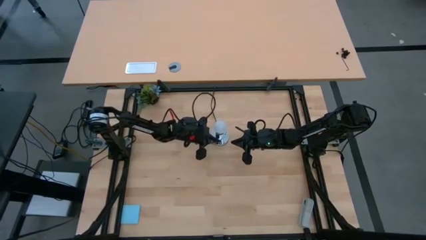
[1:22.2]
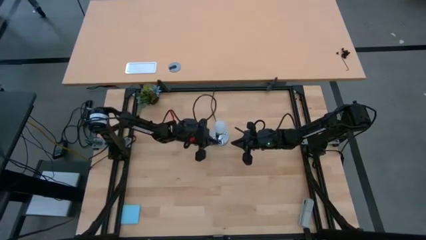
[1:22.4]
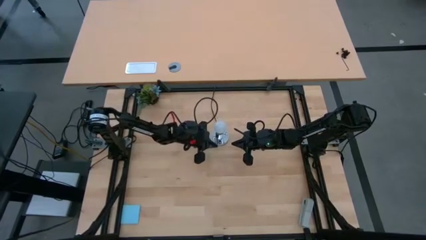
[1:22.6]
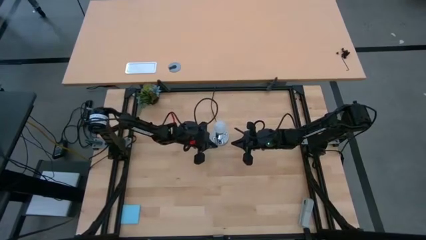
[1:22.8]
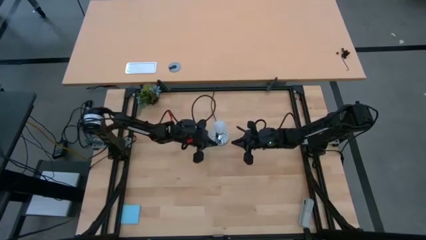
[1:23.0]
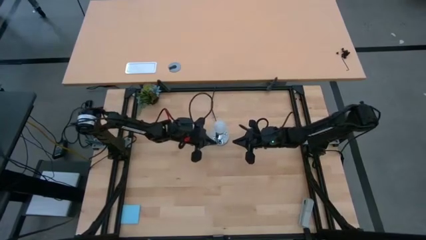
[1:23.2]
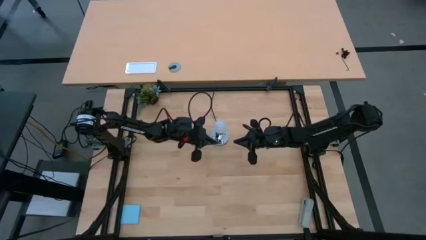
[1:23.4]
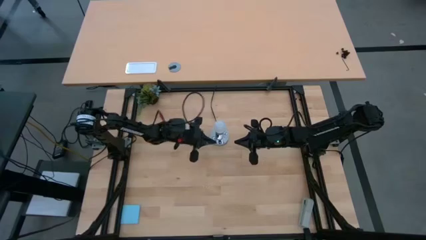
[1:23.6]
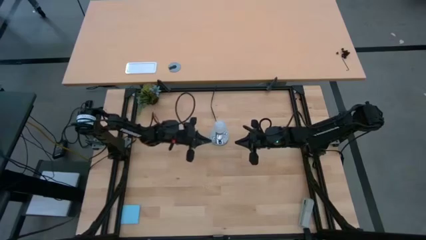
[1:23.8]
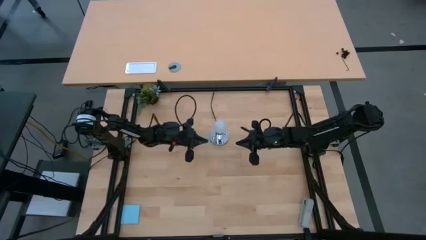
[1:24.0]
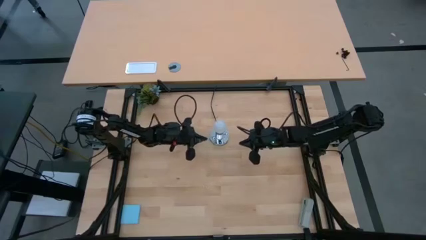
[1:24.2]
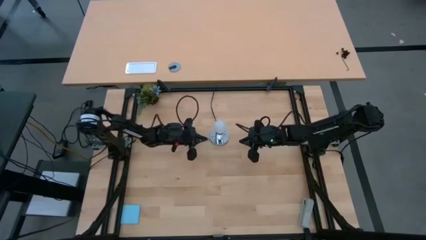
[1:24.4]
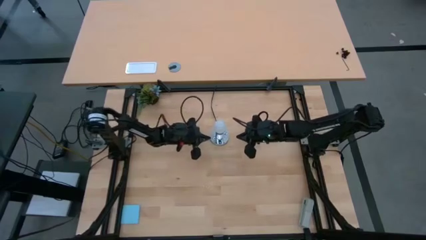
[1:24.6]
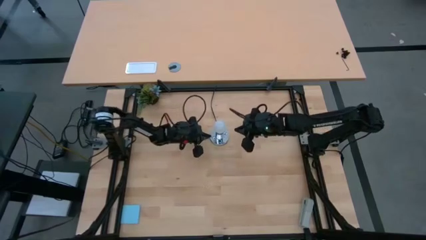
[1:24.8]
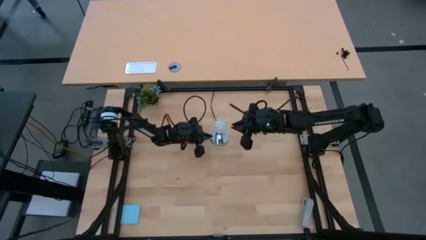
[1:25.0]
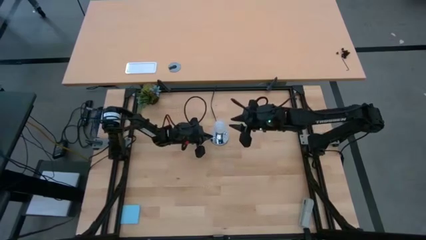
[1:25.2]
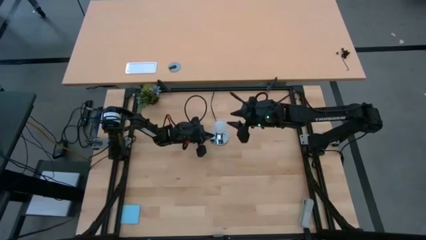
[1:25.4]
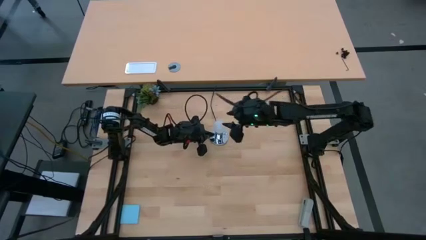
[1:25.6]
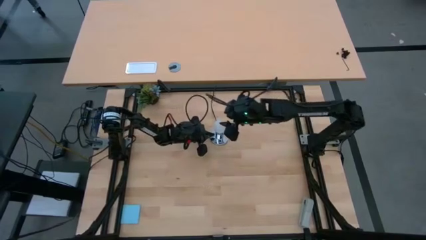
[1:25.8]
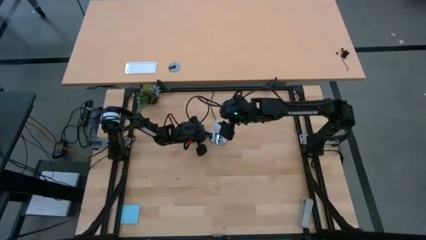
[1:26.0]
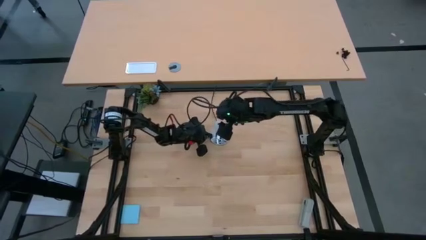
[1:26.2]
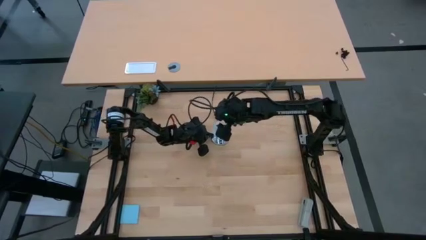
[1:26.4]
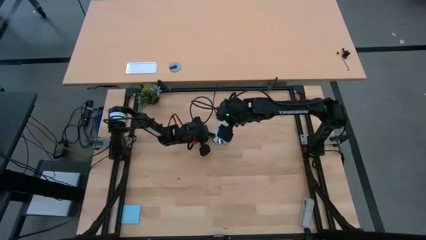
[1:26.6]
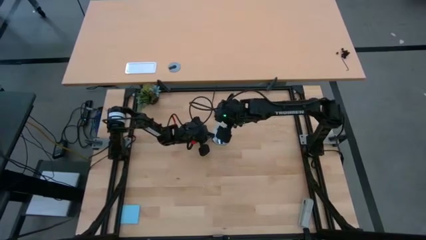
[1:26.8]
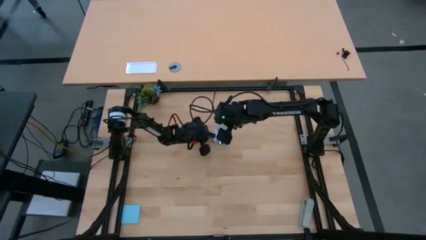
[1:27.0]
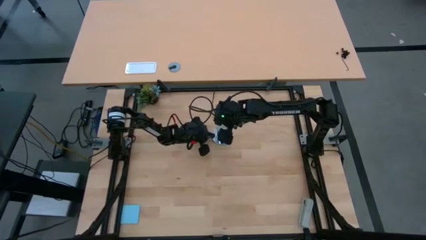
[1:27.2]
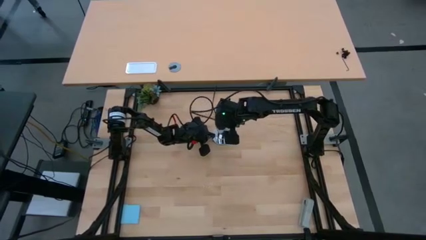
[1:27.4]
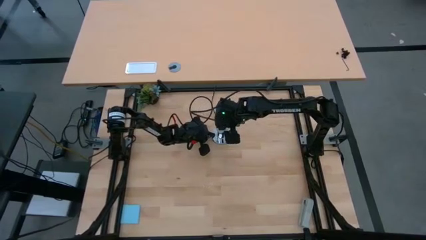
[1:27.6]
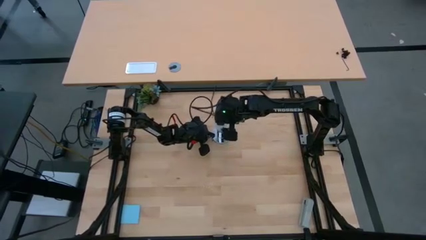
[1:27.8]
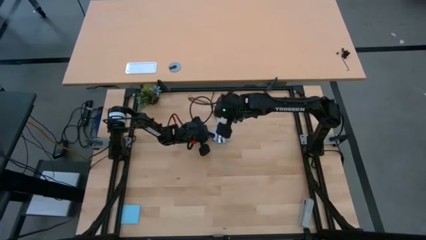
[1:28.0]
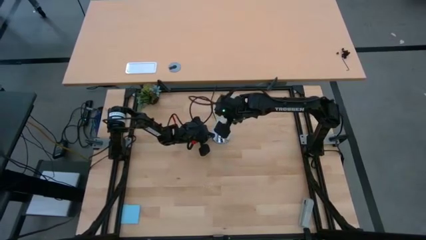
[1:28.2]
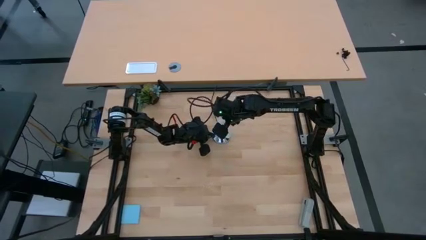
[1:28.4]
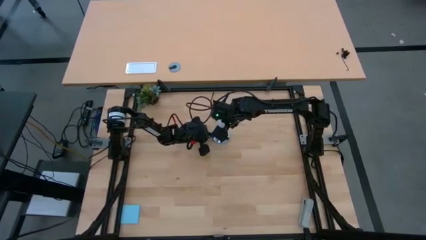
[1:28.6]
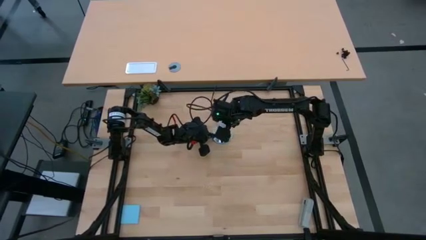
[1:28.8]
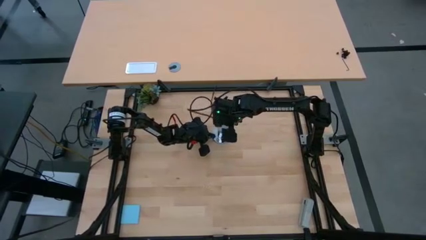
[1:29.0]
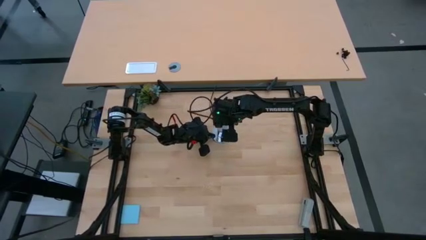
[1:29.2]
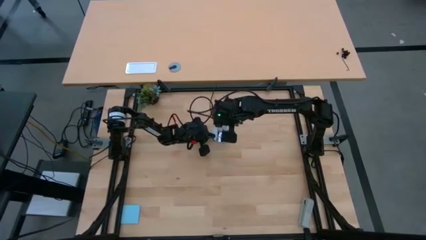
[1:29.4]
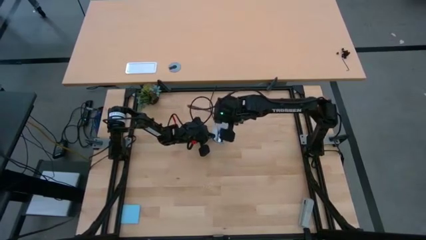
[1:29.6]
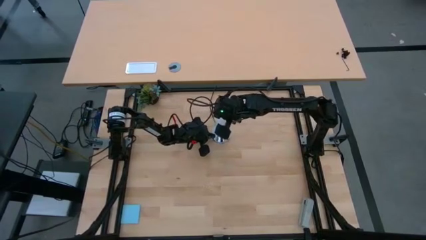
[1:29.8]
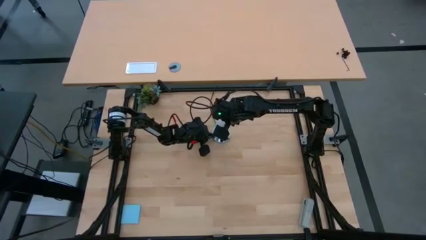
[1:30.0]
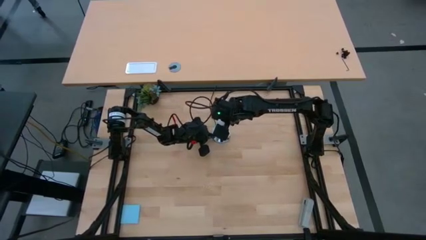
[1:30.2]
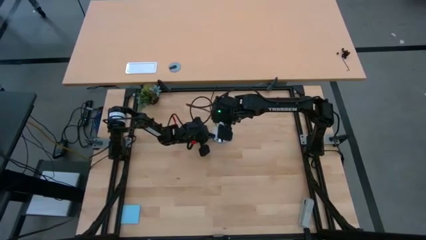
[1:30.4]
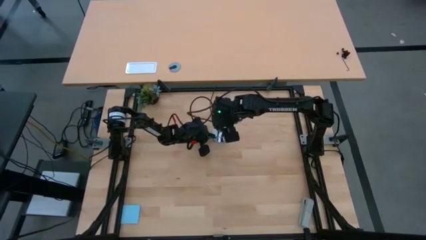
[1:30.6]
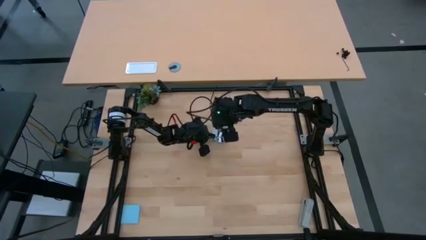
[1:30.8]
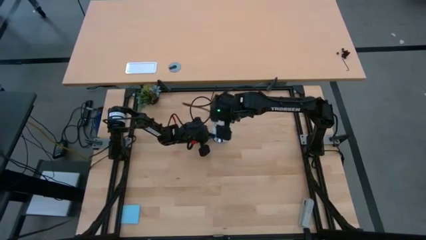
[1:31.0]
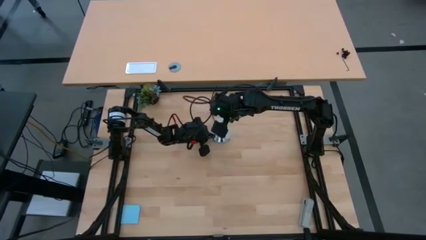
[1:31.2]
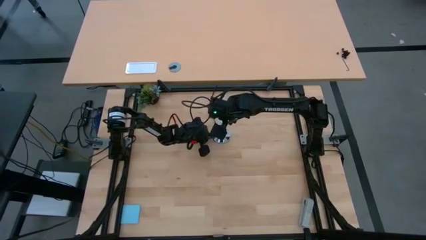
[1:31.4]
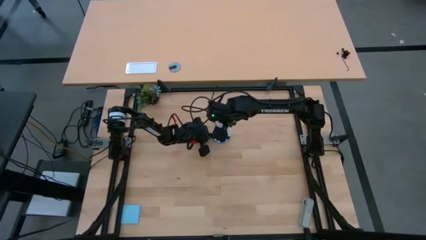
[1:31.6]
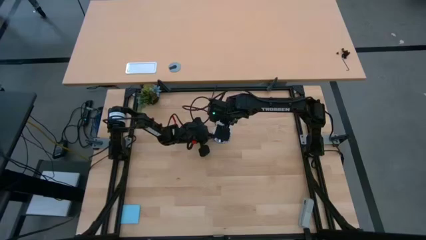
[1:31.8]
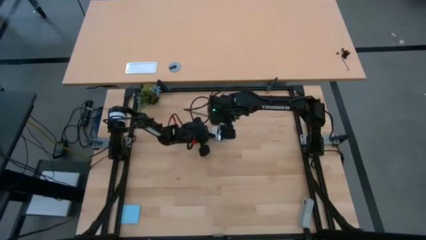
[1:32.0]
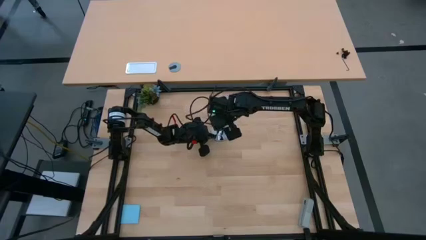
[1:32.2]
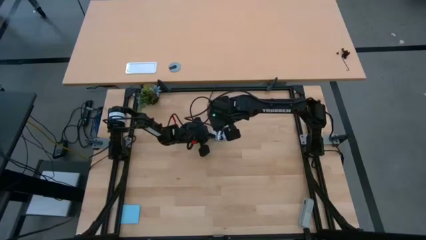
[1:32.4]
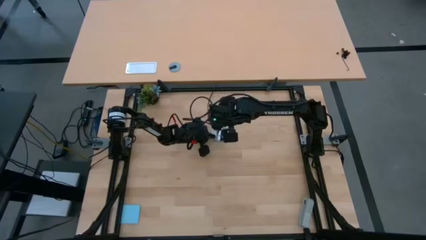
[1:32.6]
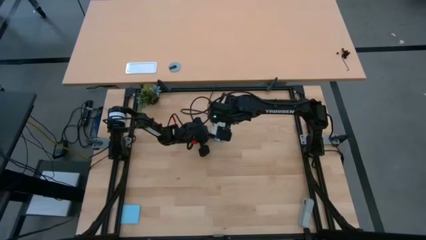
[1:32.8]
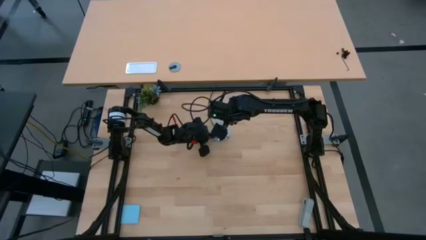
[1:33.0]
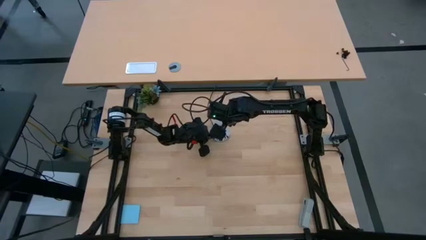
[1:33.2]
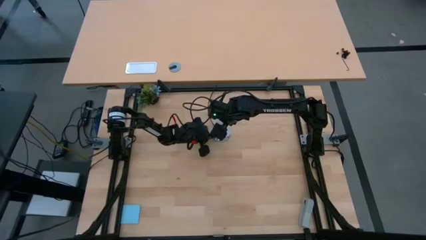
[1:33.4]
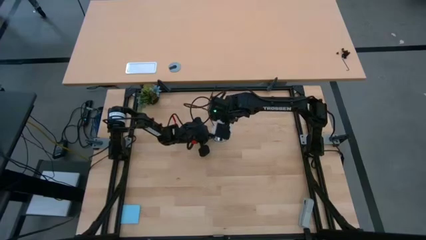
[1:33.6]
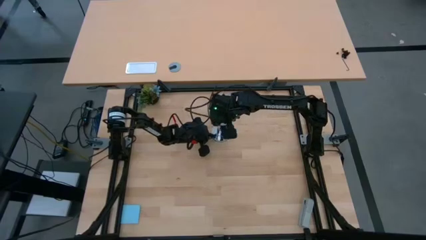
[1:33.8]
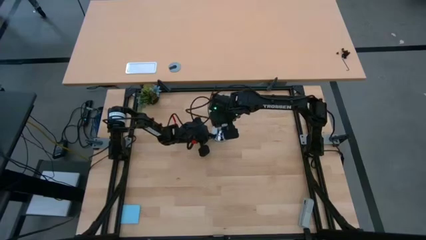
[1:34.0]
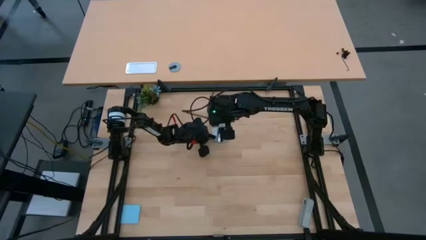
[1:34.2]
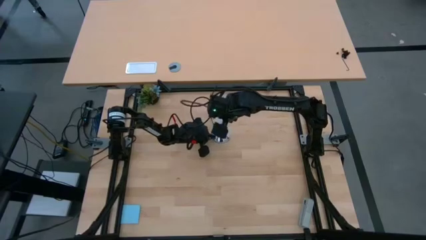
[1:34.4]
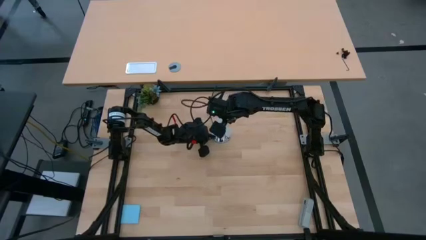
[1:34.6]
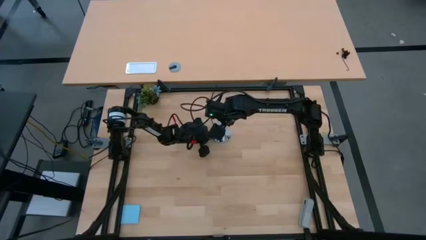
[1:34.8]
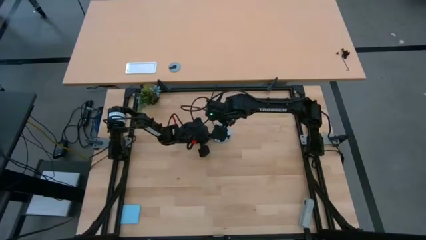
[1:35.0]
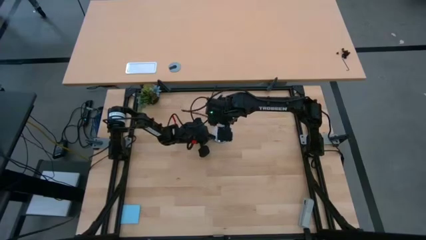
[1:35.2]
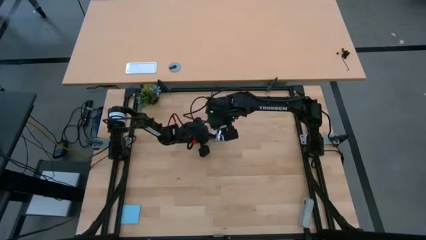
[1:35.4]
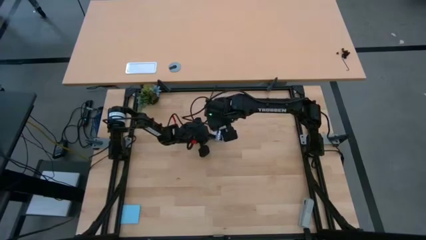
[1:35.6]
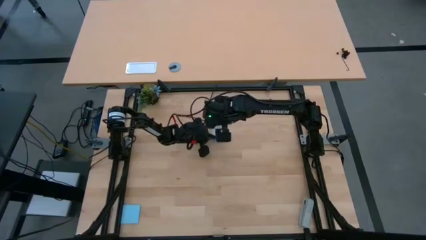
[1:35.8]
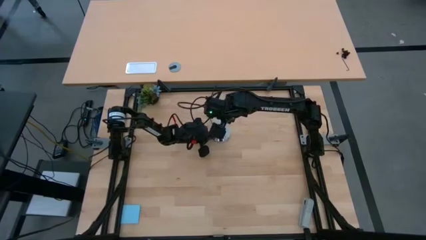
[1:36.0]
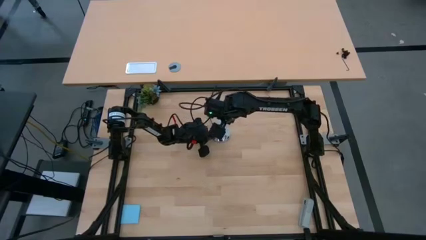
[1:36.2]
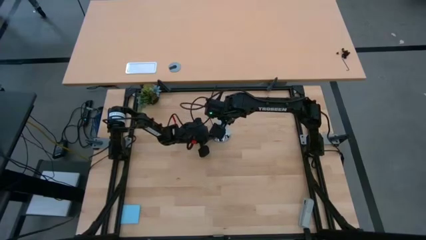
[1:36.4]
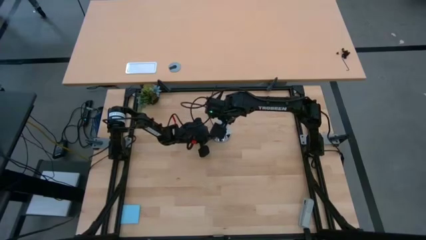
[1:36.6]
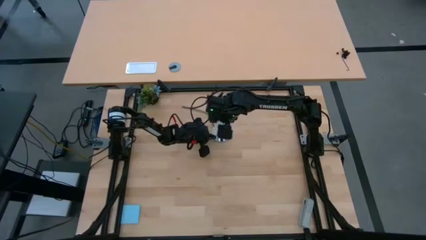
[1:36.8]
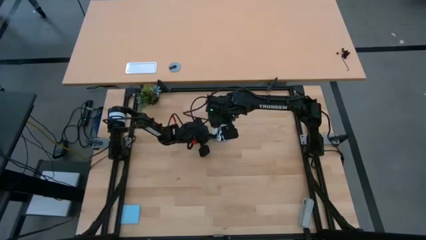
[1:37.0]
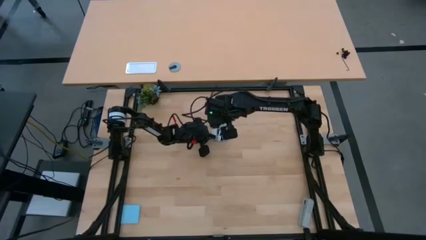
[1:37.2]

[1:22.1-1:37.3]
Task: Screw lightbulb
Remove the white lightbulb from the silver lamp
